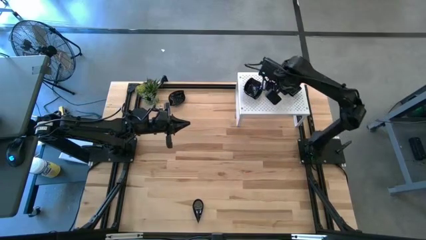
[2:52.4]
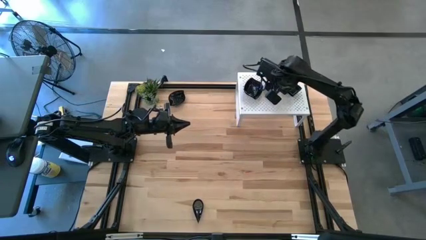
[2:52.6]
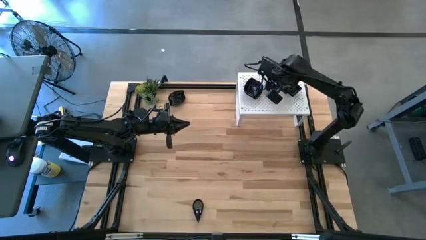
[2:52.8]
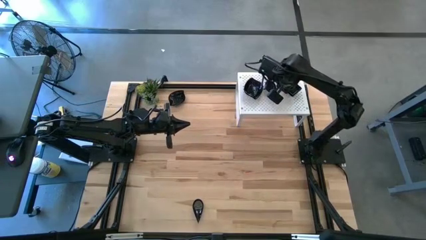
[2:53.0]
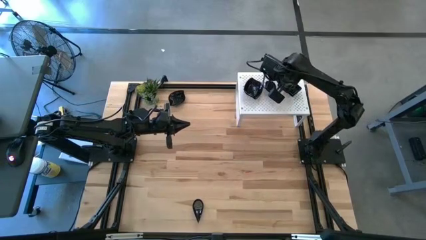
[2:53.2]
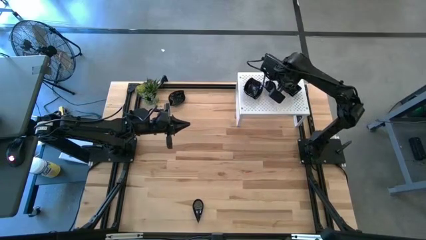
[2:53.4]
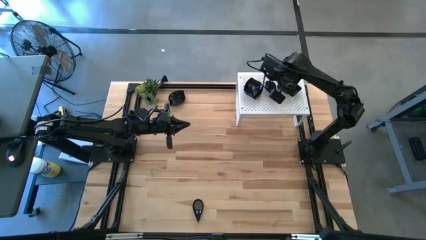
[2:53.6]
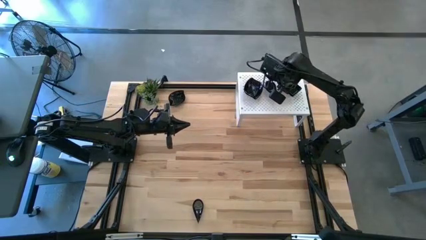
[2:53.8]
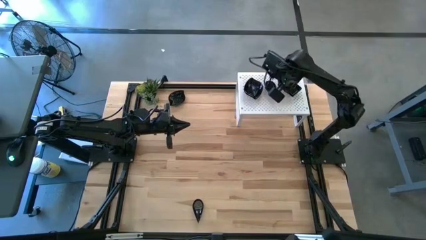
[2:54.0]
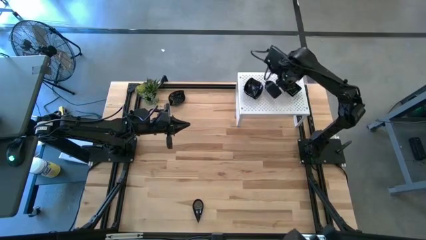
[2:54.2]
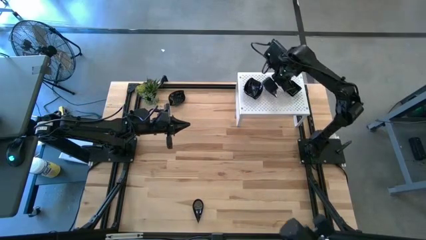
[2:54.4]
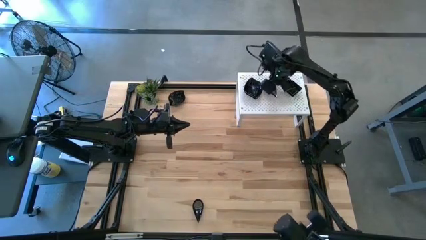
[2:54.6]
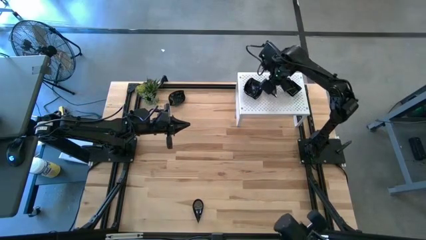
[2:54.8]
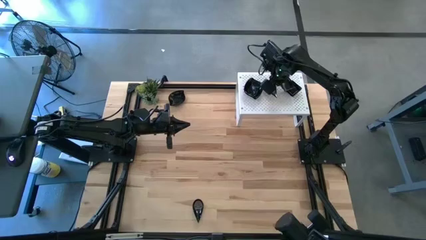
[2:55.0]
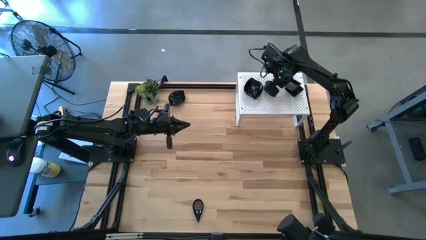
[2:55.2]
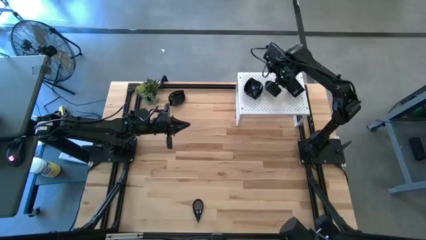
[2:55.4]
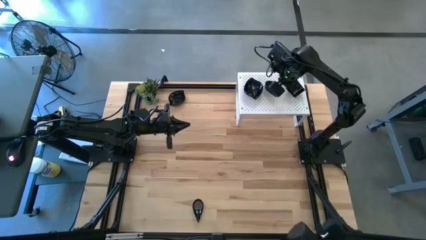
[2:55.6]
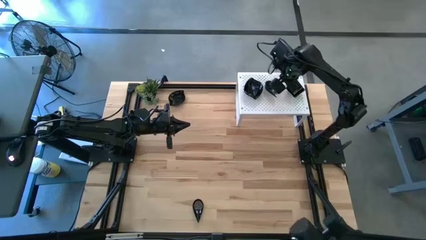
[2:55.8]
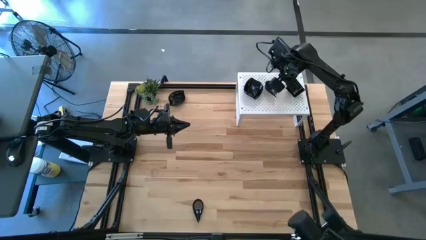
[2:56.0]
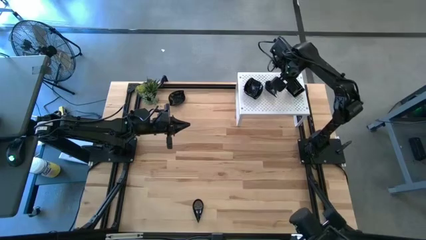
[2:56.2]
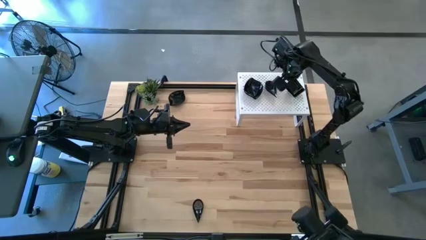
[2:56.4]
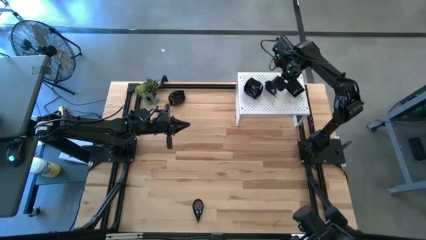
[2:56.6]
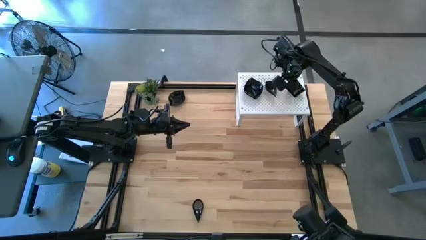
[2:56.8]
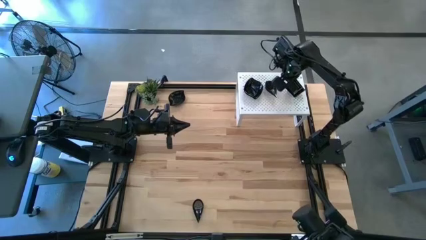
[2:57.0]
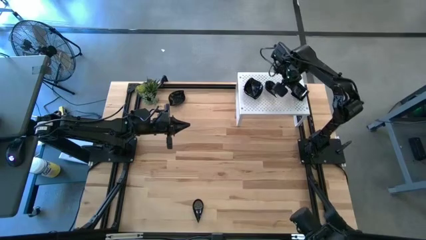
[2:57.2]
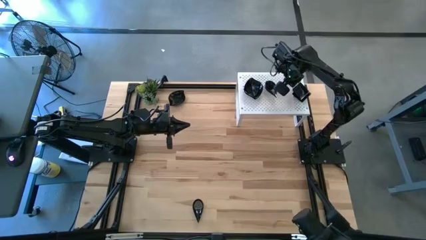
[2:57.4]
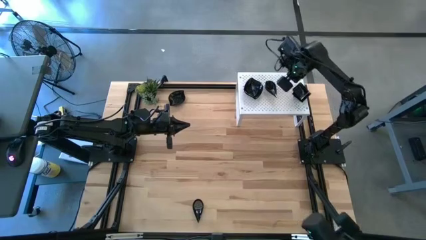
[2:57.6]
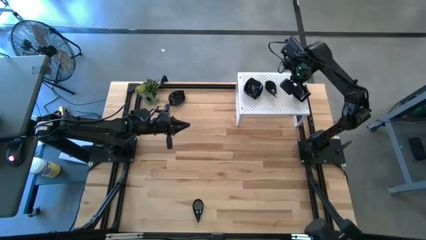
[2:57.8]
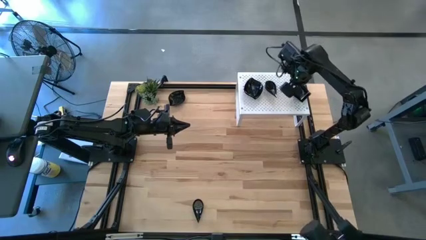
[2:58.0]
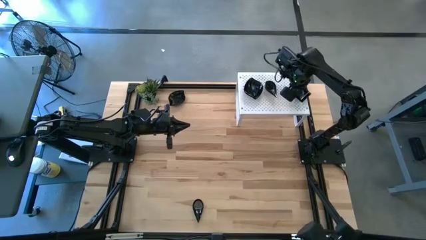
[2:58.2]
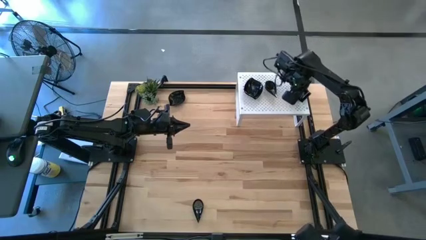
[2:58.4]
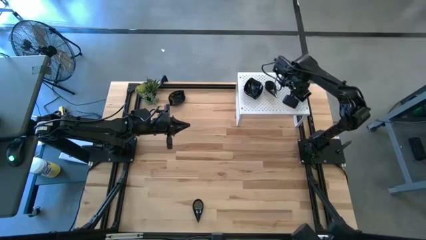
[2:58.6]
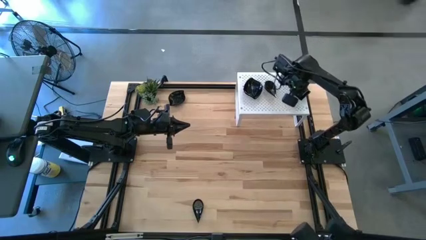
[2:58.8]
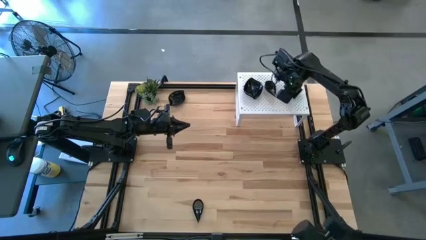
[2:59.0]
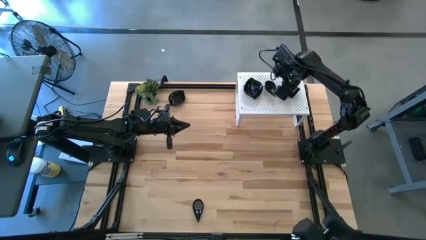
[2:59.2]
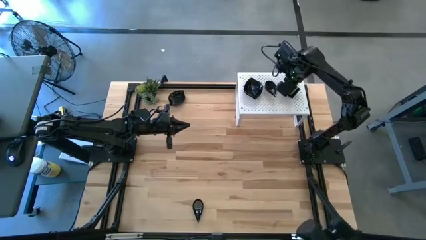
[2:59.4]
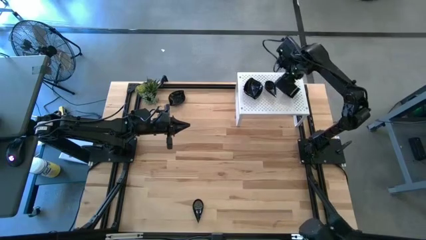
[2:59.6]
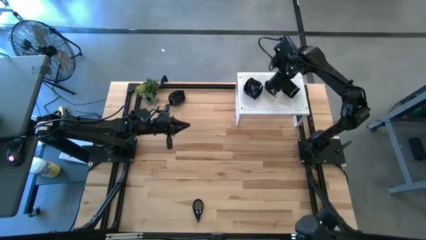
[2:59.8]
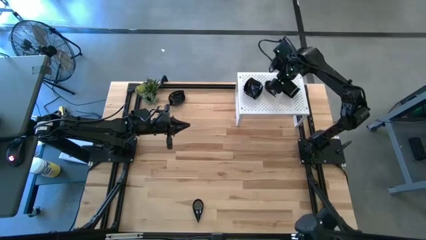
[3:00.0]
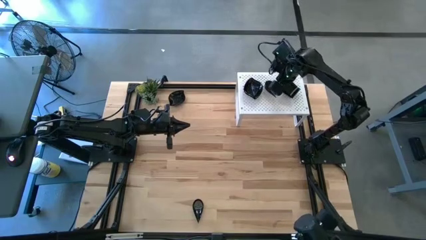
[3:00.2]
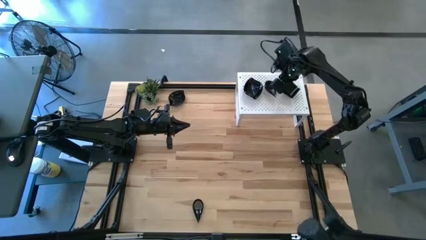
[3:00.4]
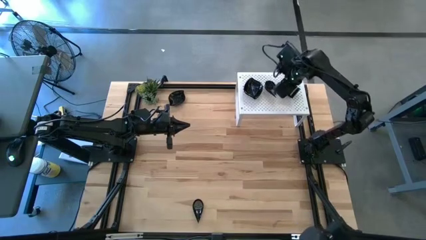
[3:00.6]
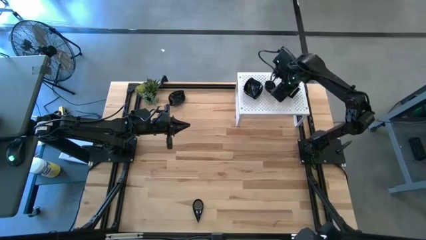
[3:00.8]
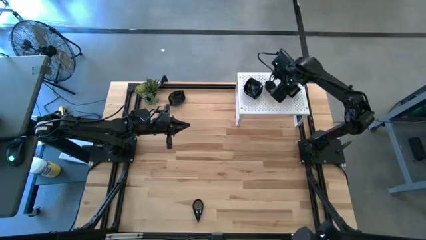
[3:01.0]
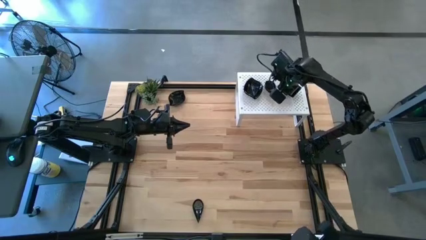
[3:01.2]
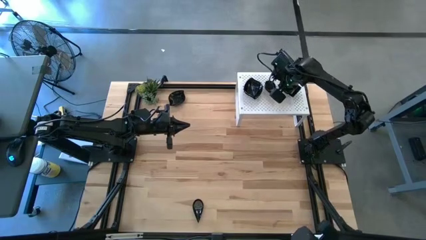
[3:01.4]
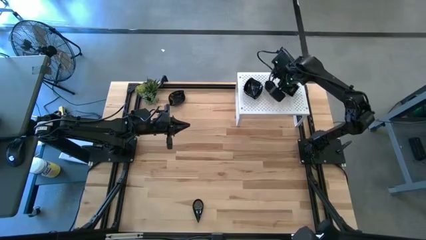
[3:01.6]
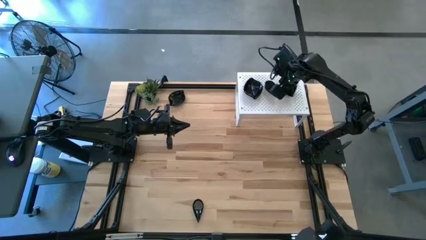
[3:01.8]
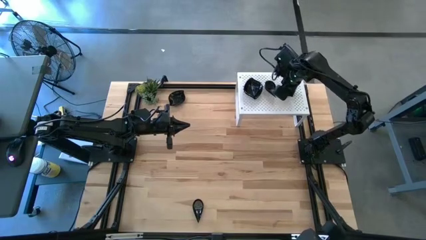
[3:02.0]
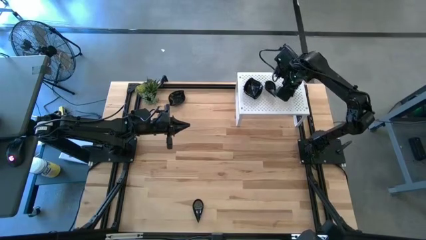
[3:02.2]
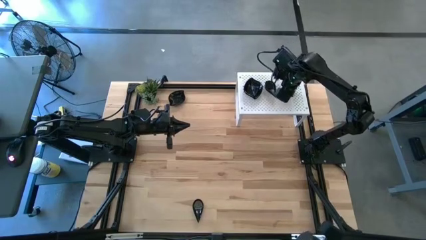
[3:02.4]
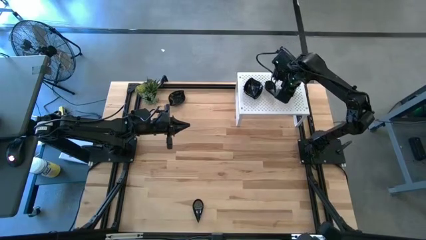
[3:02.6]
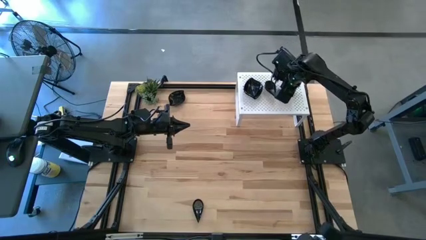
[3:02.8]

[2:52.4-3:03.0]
Task: Pick & Place Mini shaped plates
Stack the black square plate on top of the black square plates on the shelf

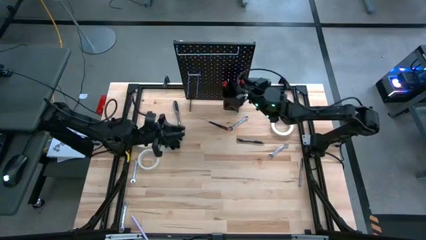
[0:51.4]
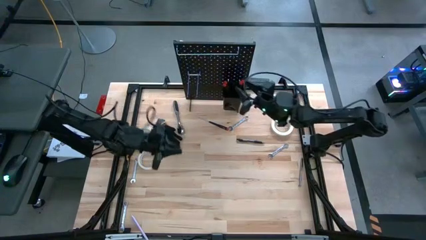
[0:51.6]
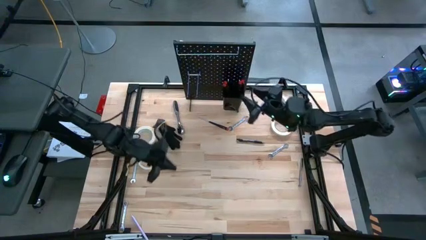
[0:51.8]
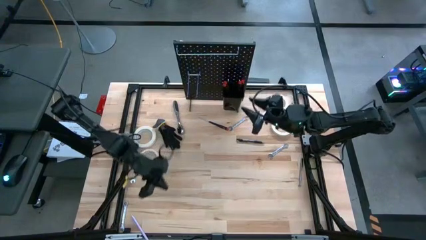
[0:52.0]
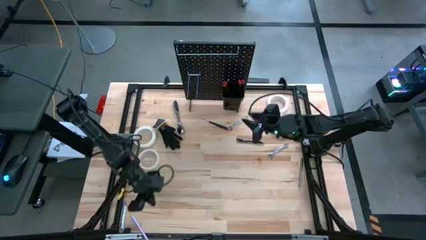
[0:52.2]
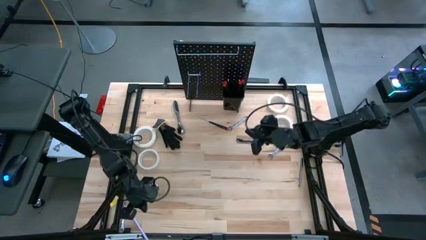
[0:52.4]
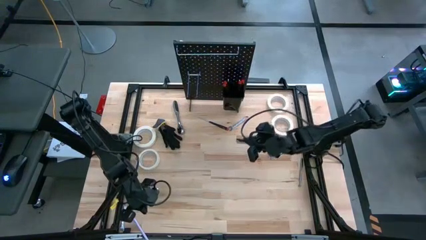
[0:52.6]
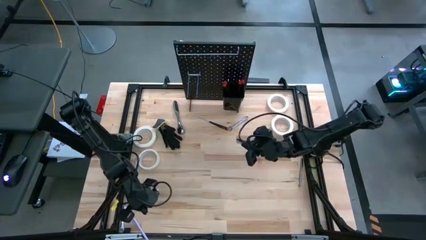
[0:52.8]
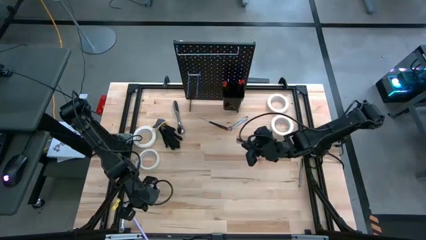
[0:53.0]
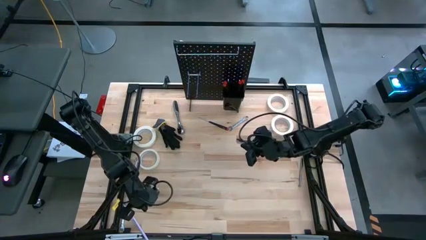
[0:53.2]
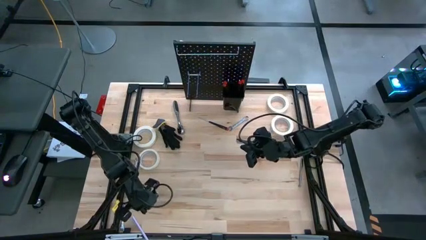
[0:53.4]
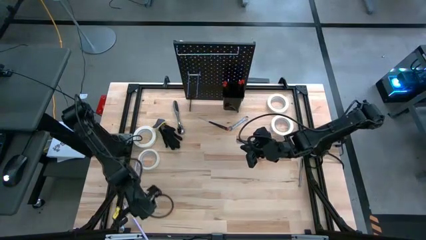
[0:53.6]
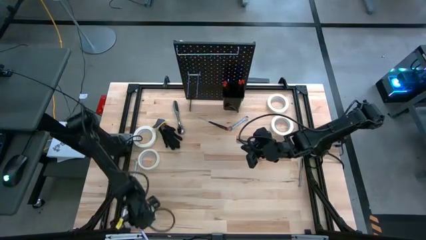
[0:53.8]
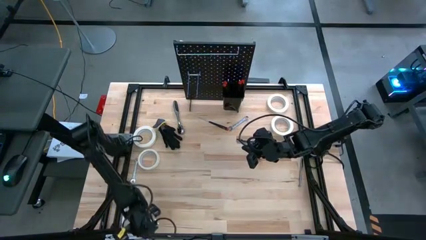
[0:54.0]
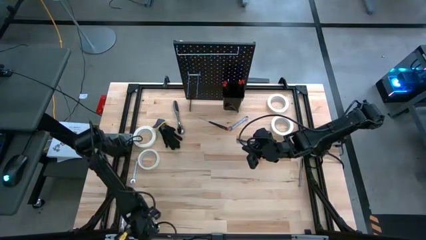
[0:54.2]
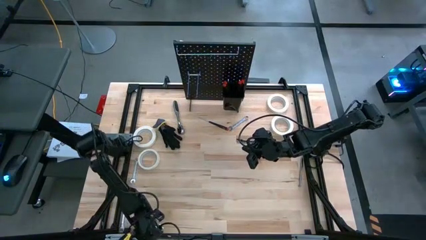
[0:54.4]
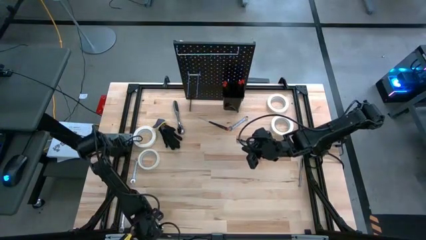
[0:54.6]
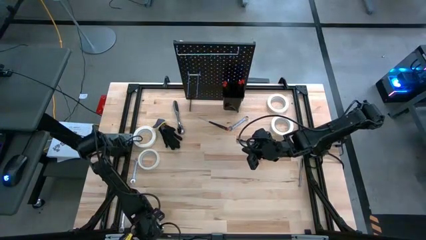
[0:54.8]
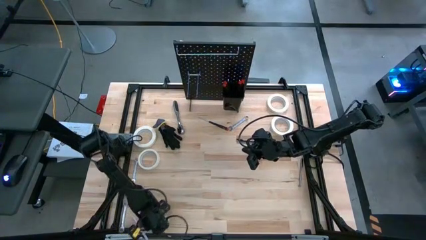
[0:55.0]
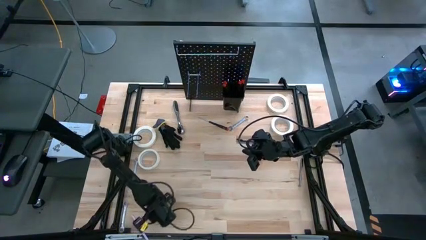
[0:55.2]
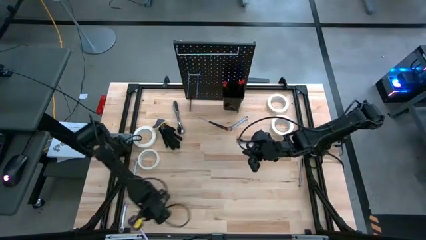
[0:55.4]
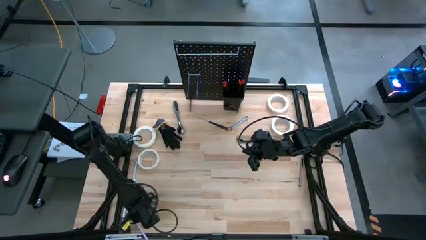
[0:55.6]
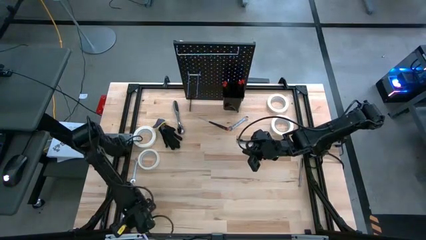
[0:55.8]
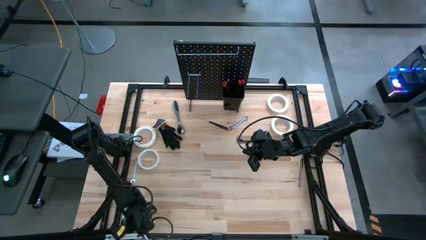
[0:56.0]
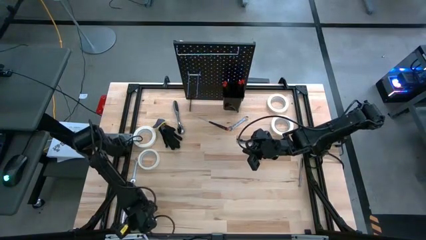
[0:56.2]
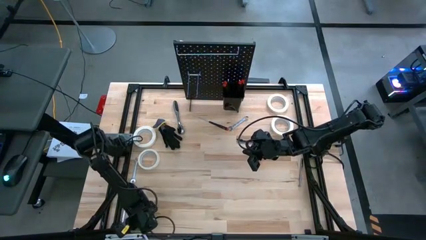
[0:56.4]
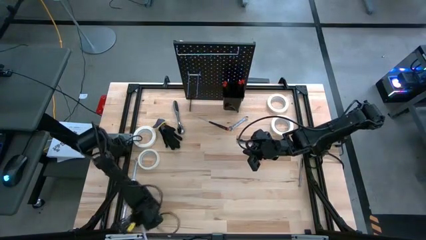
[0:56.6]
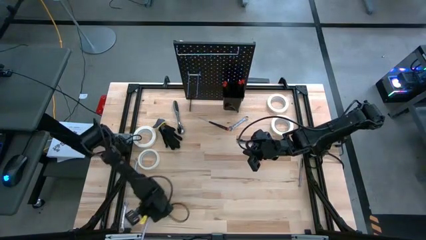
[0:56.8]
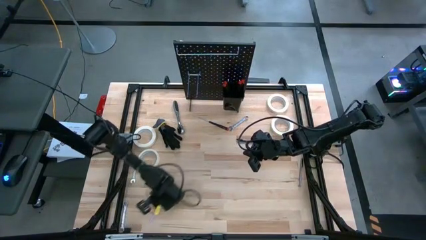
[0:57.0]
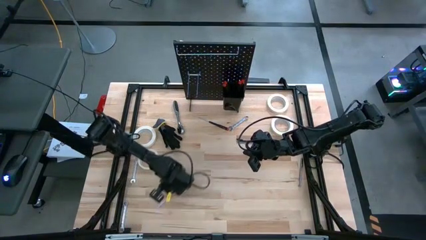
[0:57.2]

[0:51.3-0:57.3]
Task: Hang tools onto peg board
Adjust the violet pen on the table
